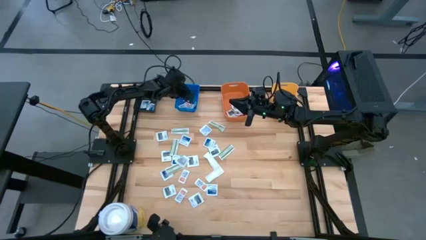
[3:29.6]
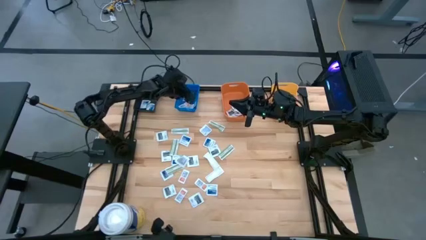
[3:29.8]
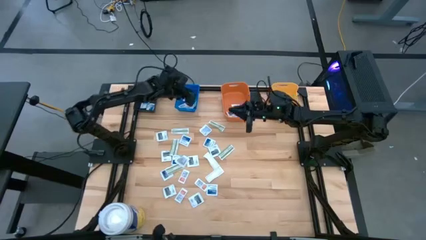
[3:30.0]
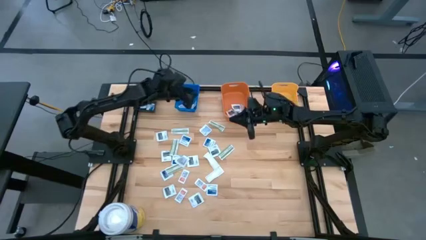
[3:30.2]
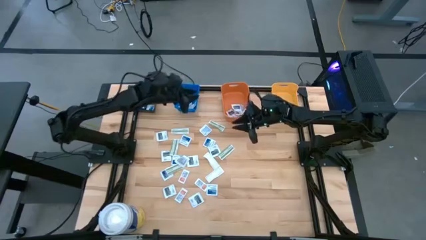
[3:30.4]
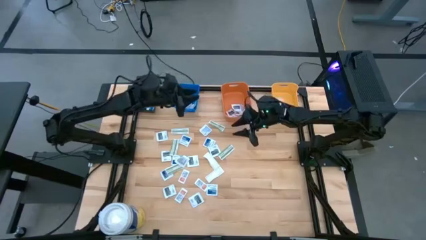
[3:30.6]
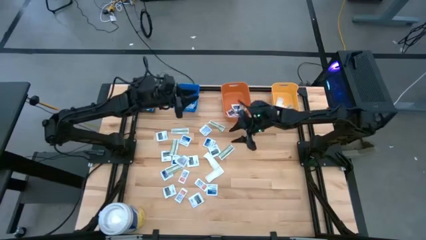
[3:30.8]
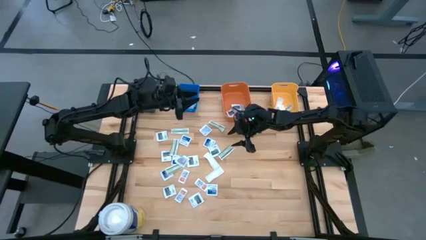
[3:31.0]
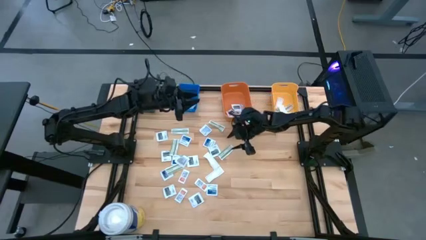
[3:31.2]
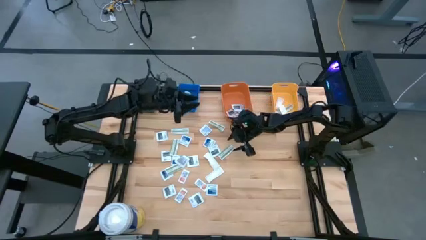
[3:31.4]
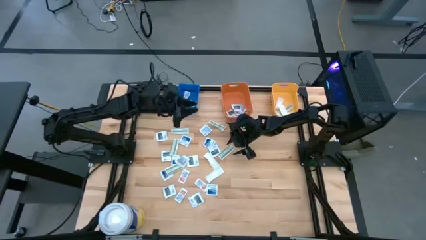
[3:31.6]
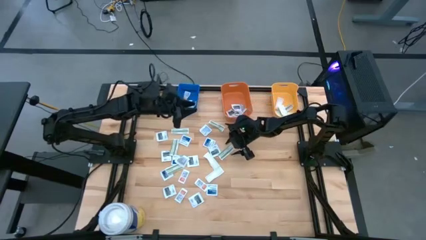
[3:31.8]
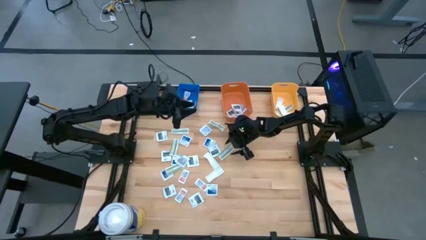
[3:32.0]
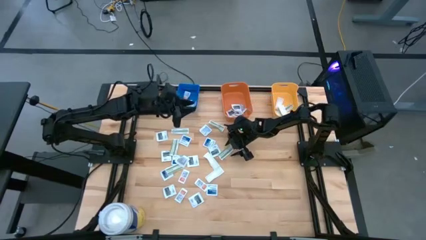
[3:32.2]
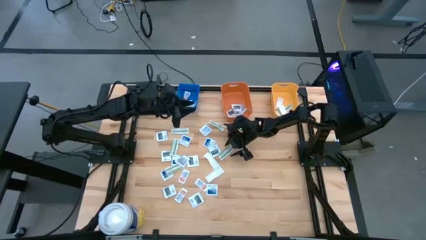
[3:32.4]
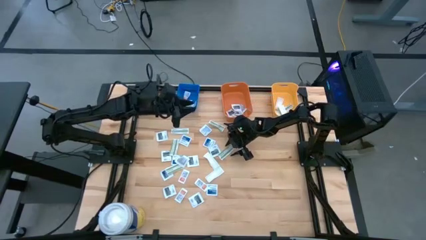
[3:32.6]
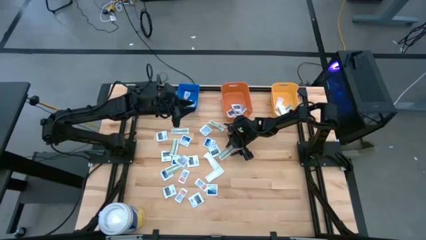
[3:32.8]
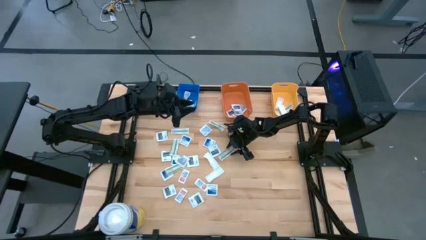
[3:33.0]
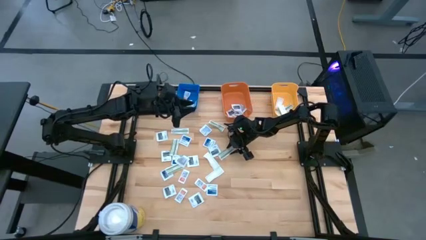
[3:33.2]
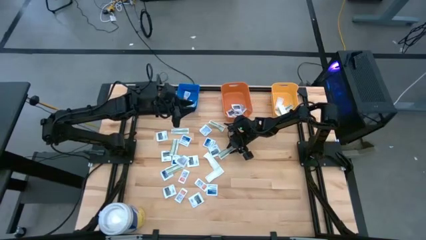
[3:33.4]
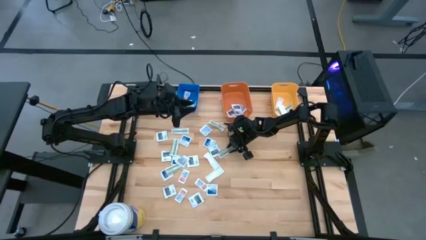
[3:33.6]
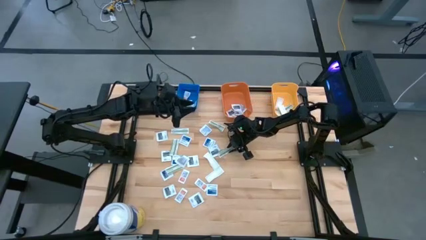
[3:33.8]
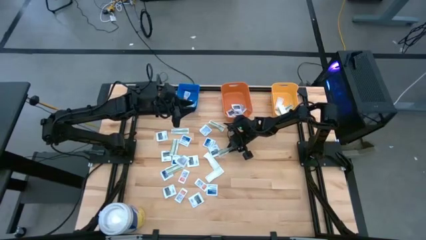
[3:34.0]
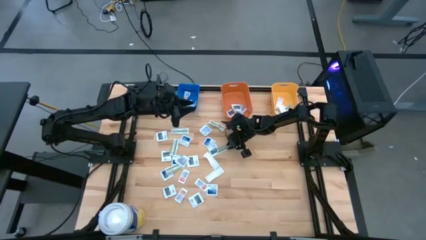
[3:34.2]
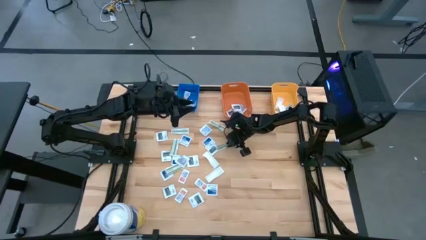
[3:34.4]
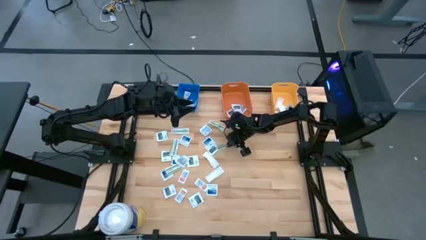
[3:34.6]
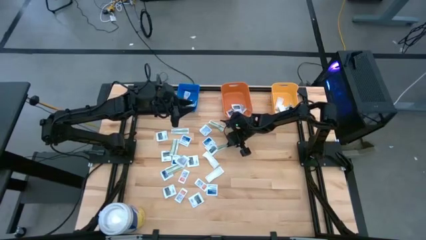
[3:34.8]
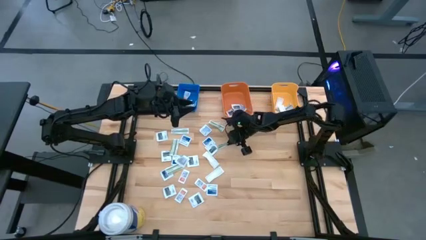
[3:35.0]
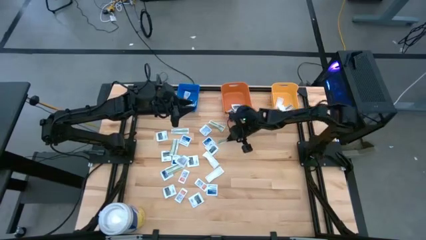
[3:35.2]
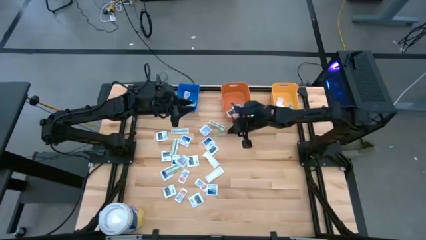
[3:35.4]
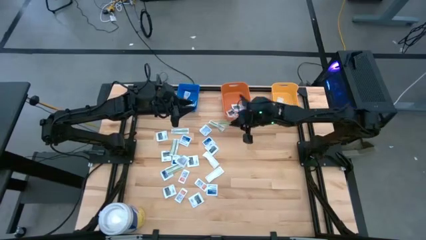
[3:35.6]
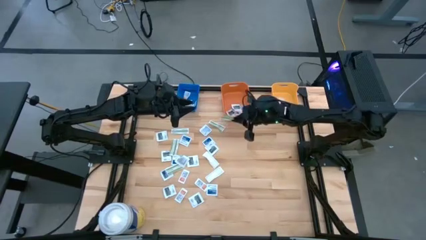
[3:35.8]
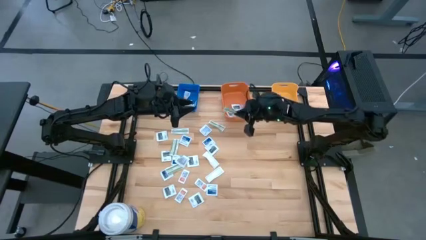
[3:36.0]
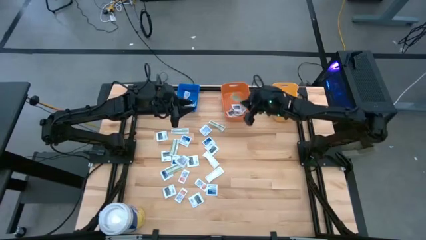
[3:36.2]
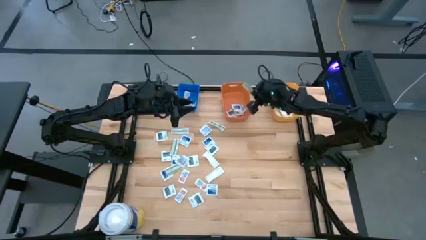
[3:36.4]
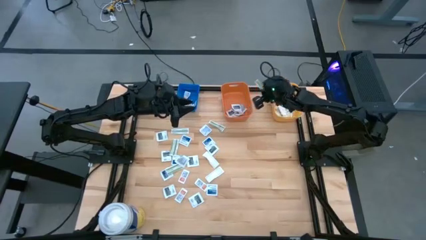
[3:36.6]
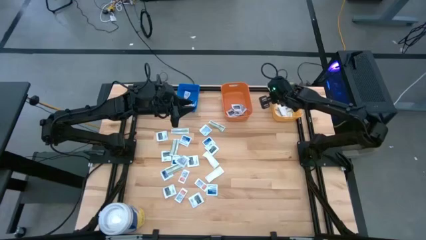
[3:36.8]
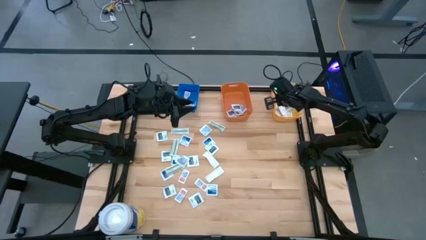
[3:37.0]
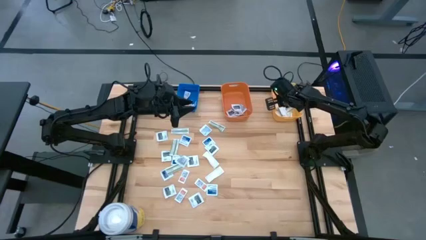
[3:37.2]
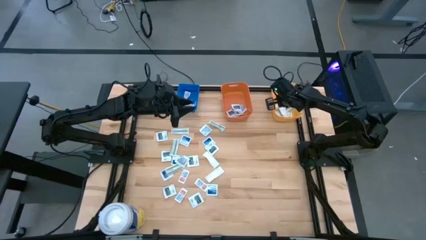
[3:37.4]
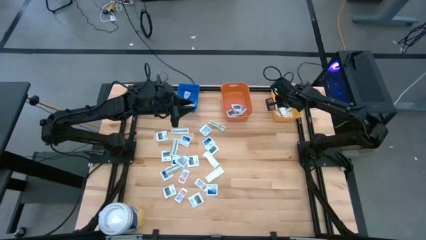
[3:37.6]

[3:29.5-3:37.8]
Task: Pick & Place First Aid Supplies
Put the bandage into the yellow bin

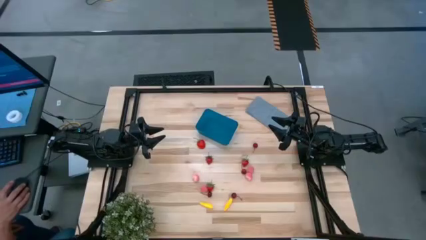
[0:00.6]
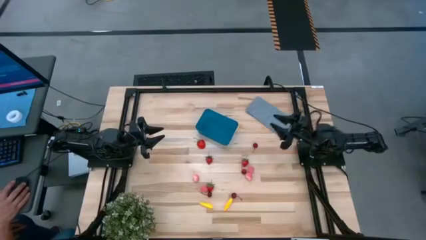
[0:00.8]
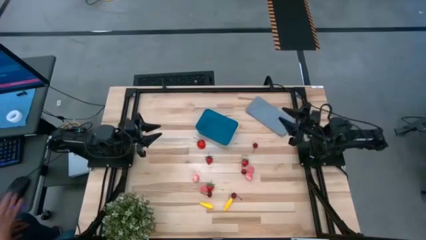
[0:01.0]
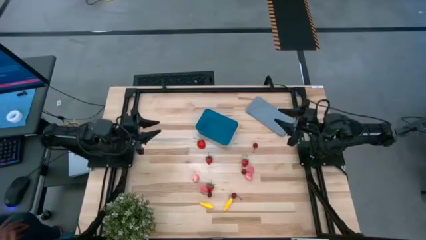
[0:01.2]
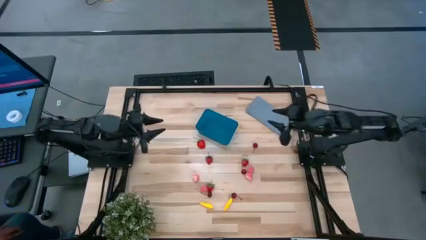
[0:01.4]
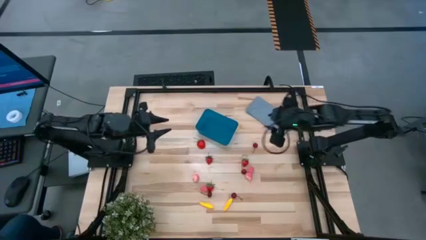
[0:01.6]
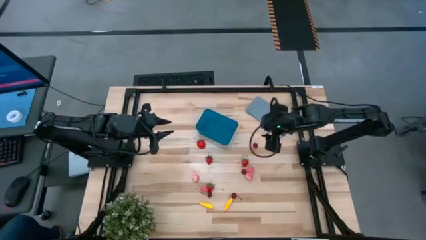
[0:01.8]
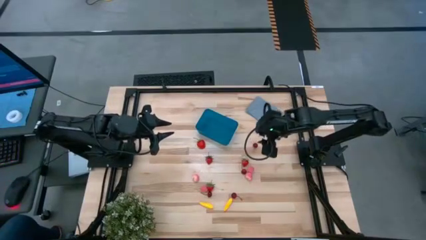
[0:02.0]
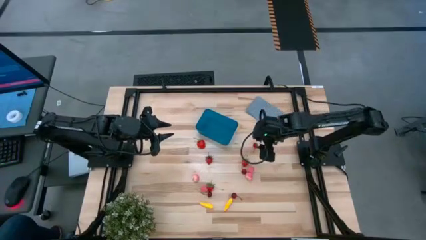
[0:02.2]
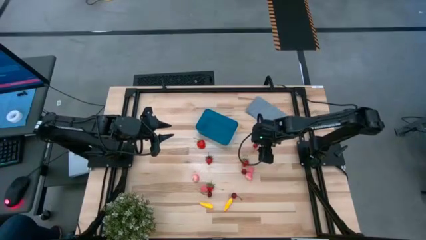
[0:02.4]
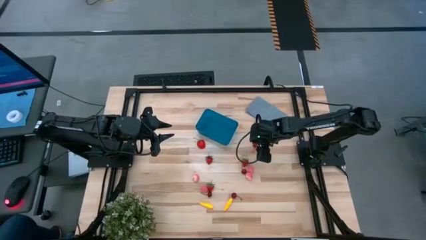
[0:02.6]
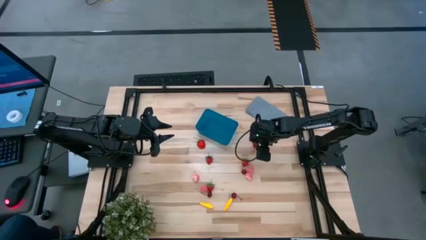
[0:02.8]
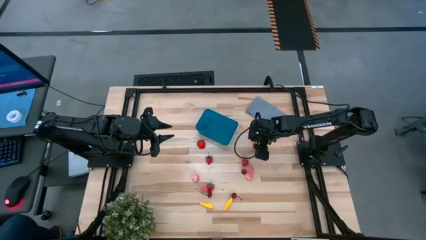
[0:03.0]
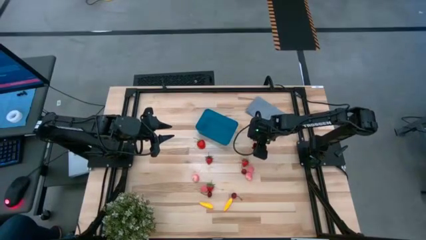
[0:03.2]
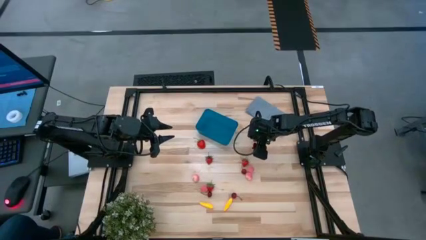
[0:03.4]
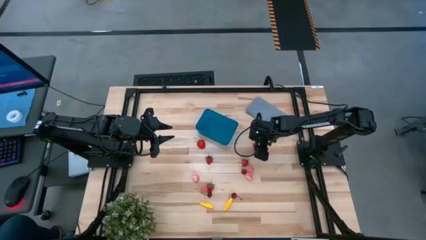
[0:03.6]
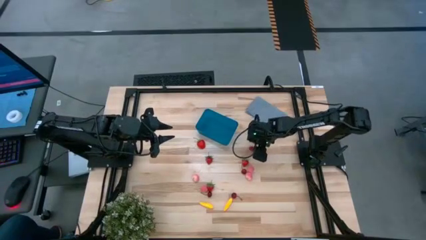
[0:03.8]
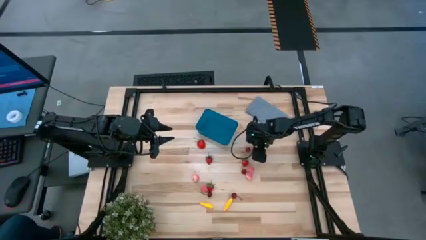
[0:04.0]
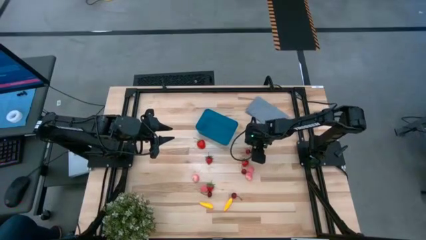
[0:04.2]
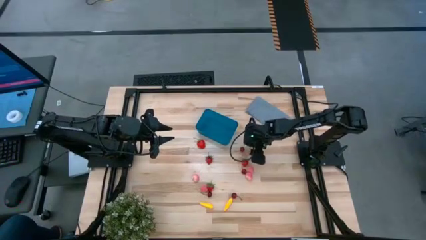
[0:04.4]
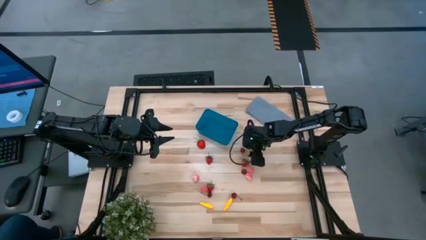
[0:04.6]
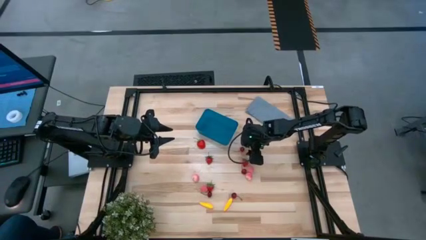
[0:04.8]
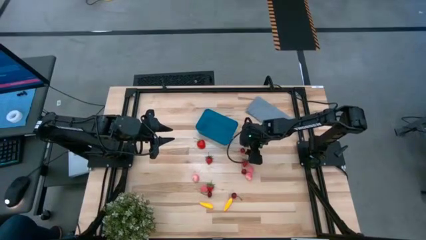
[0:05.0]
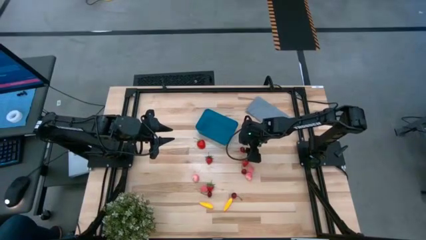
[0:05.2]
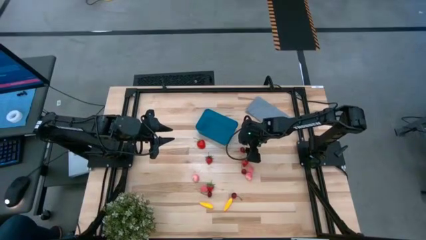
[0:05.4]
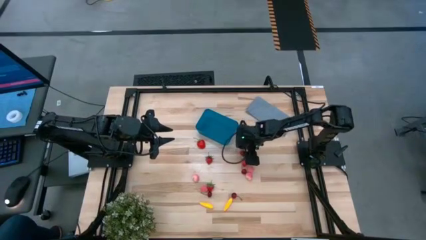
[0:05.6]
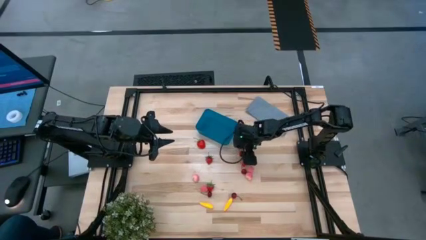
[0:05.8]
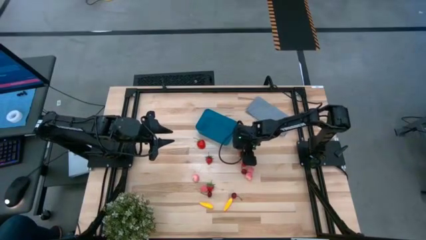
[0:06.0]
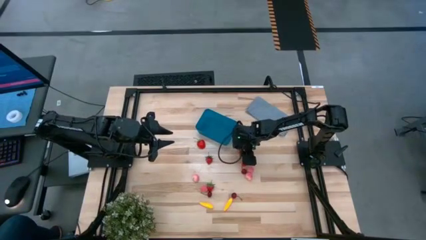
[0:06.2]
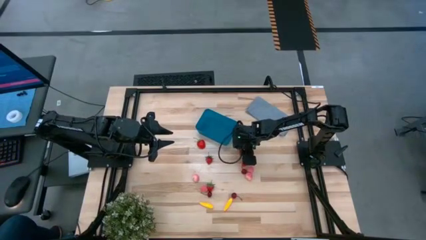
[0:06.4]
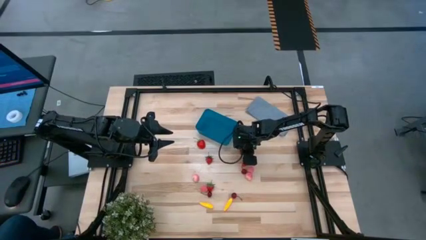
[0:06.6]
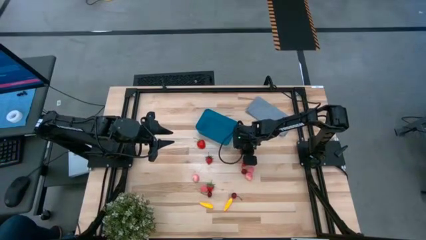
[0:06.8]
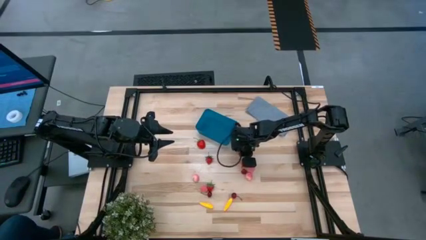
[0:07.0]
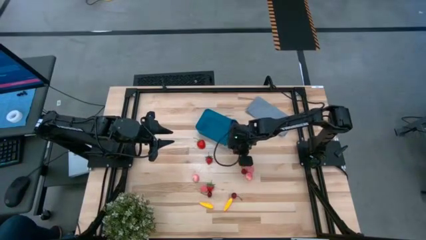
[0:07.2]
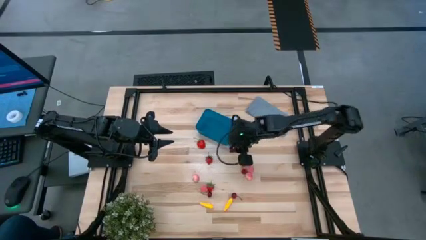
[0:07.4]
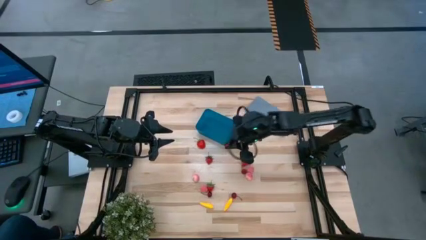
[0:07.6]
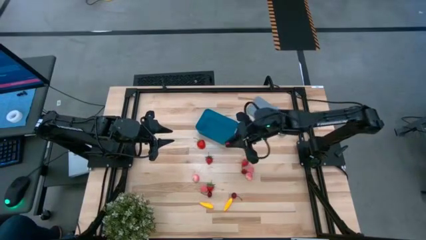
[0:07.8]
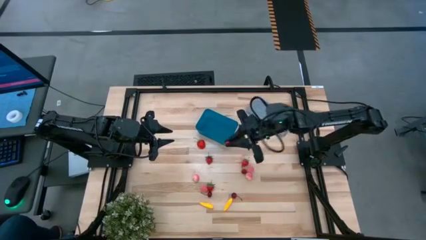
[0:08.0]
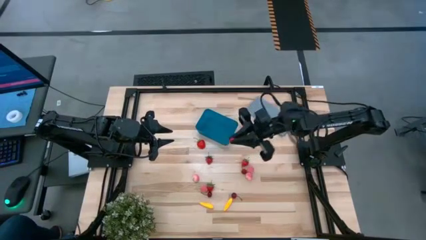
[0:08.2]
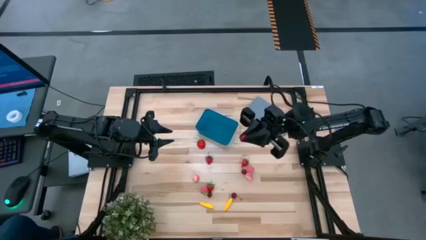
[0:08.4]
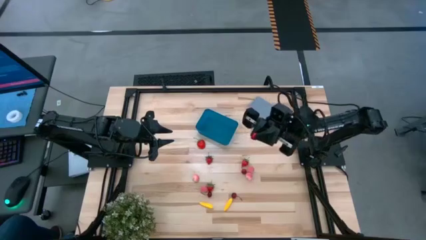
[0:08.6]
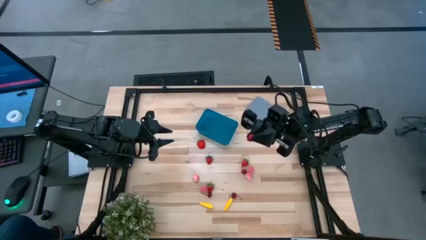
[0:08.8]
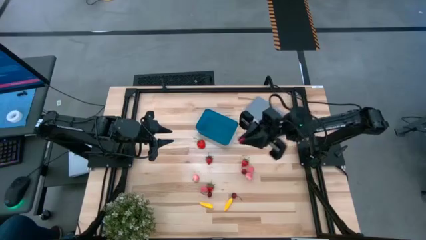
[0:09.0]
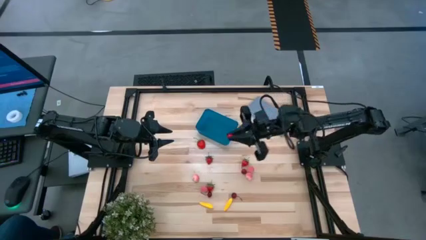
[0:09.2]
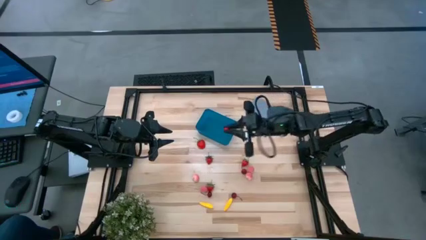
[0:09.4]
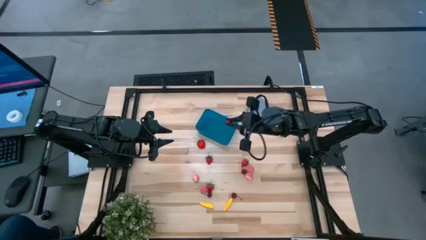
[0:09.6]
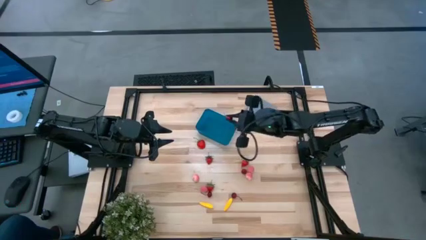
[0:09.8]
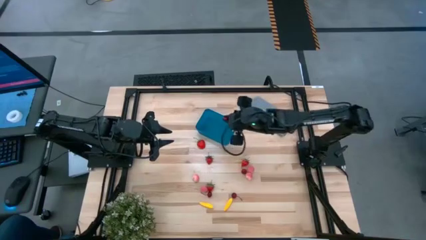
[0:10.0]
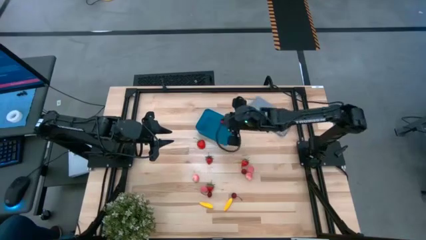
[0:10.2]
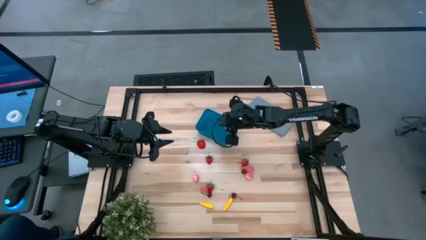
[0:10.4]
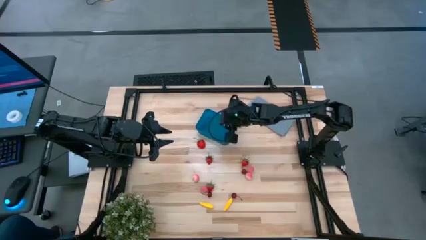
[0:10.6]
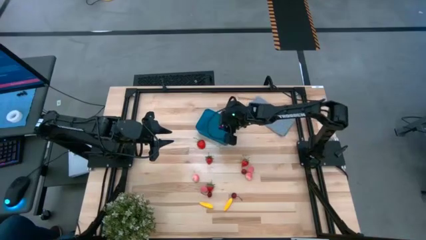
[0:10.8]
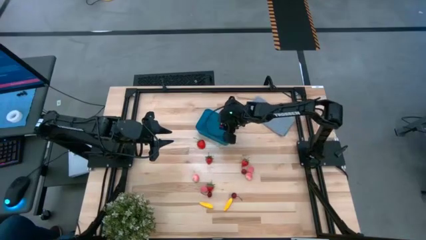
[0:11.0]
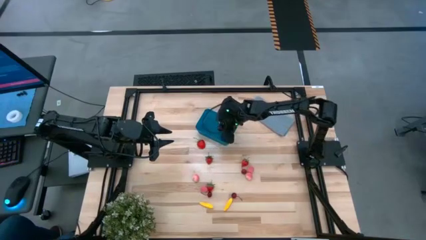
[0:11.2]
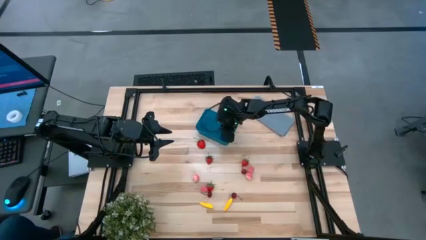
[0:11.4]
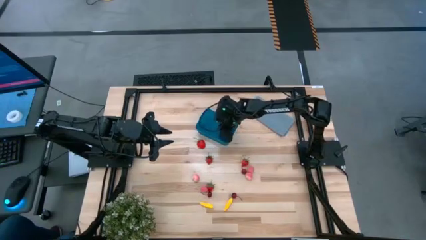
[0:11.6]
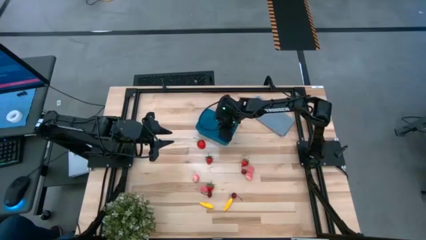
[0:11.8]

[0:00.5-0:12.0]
Task: Pick and placing Produce into tupperware
Put the red cherry into the blue bin
